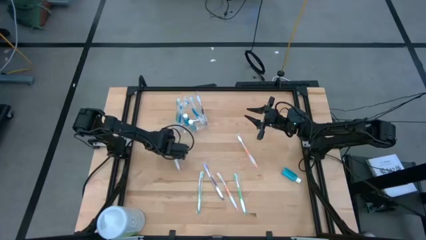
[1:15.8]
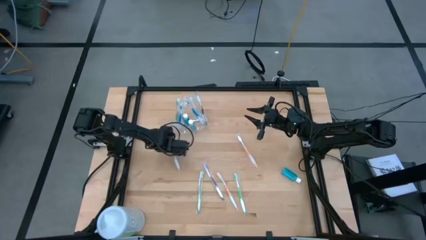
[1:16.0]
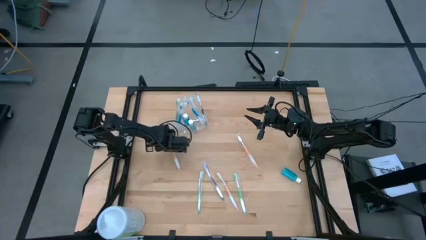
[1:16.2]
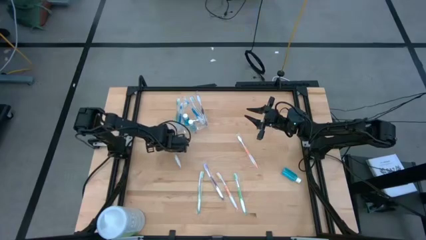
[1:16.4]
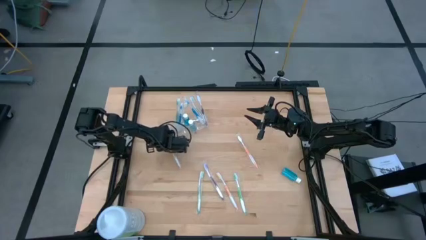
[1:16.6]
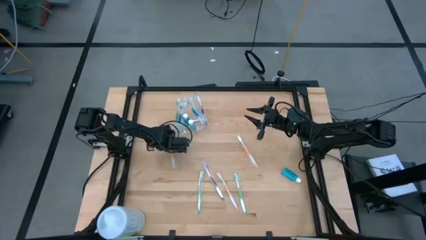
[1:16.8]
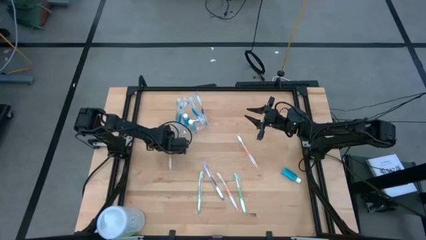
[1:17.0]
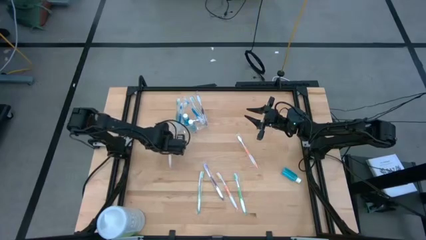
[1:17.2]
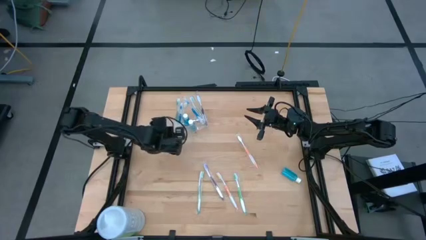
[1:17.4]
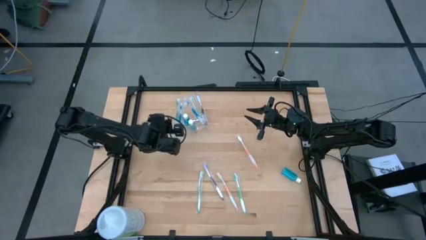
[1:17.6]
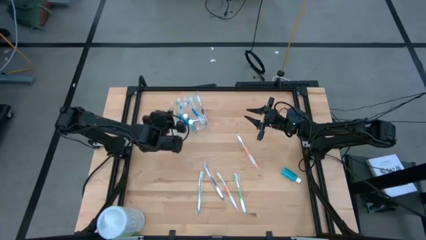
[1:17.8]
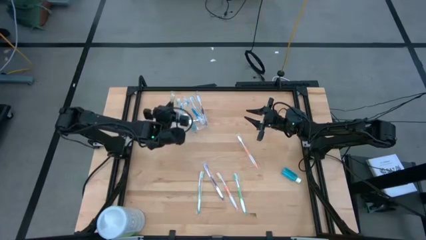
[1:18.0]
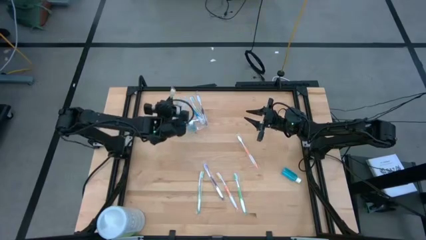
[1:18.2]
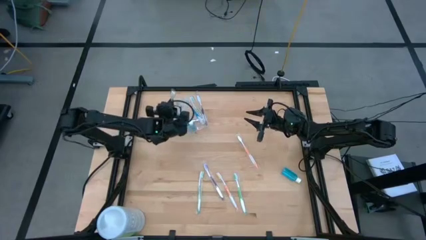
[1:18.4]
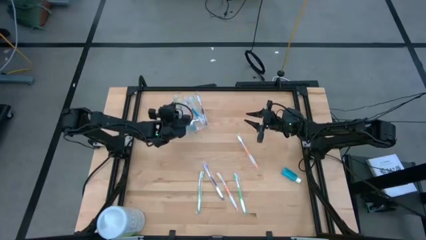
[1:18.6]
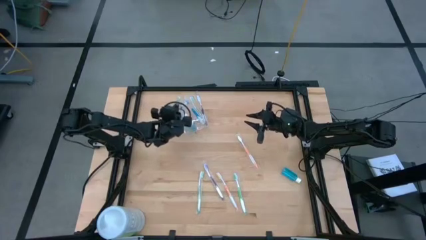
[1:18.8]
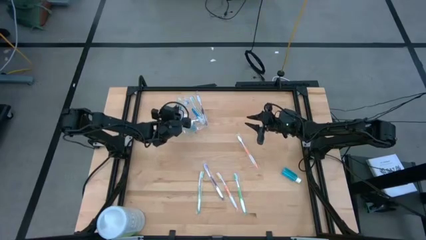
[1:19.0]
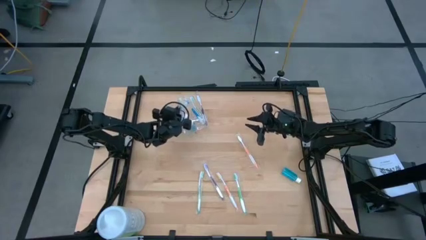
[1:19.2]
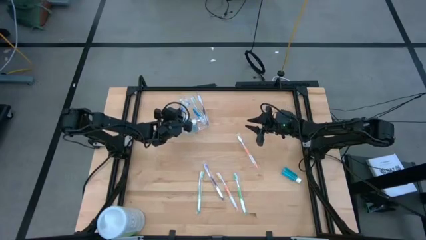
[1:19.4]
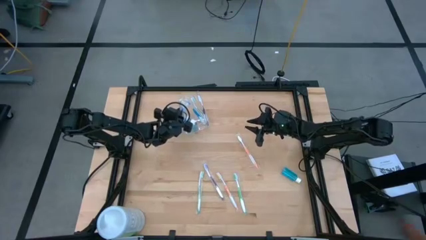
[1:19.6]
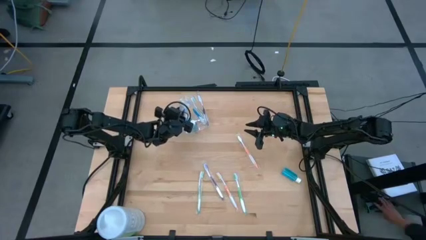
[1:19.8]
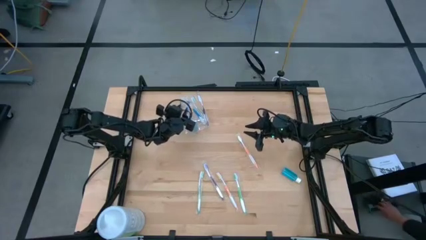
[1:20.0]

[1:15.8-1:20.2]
Task: Pick & Place toothbrushing station
Put the orange toothbrush into the transparent organizer

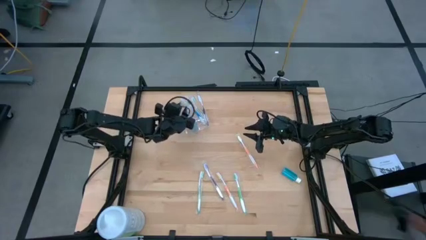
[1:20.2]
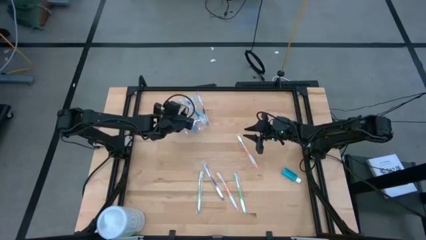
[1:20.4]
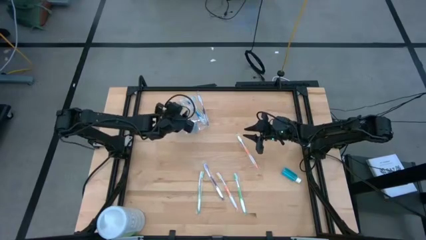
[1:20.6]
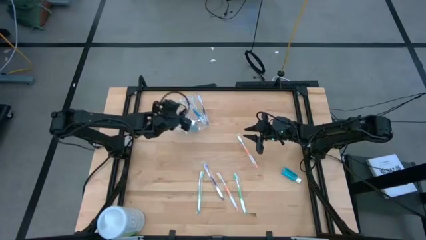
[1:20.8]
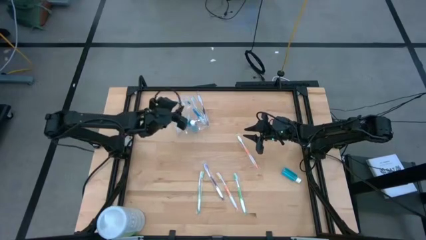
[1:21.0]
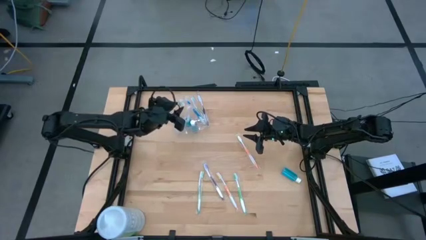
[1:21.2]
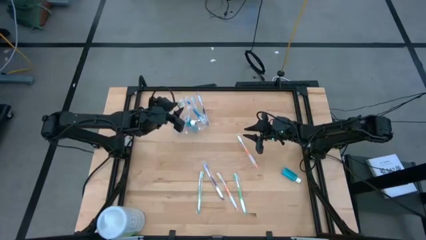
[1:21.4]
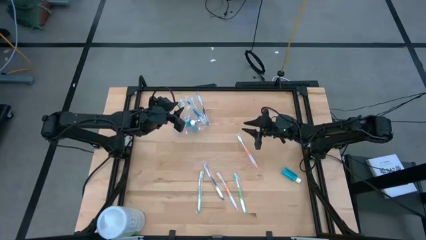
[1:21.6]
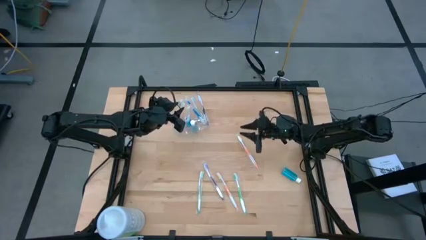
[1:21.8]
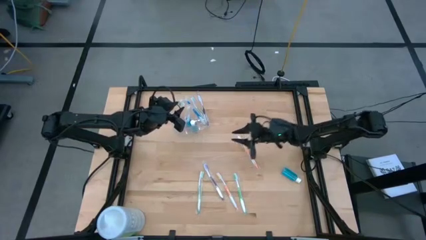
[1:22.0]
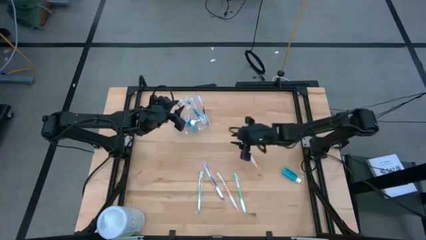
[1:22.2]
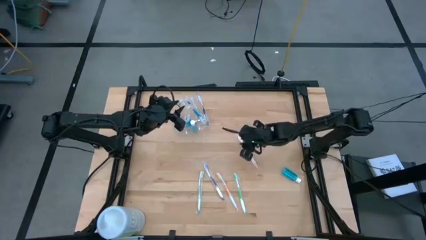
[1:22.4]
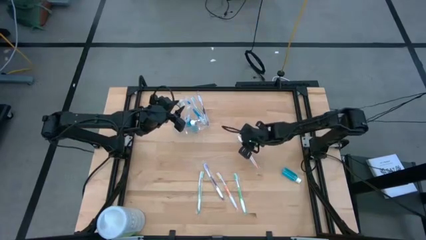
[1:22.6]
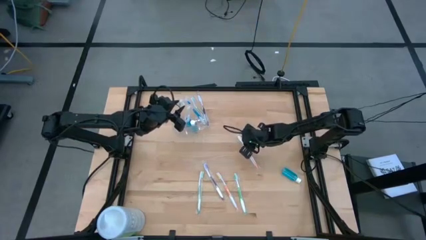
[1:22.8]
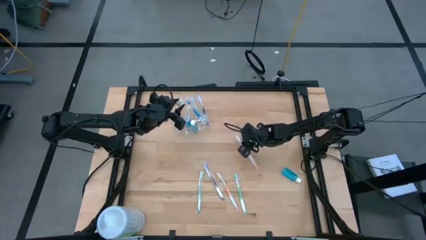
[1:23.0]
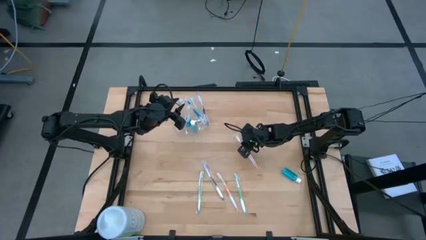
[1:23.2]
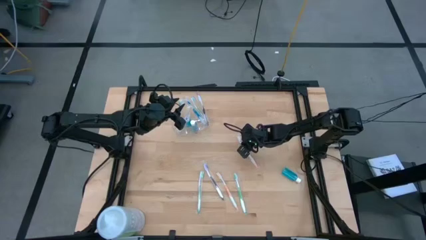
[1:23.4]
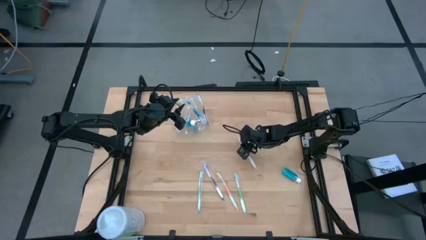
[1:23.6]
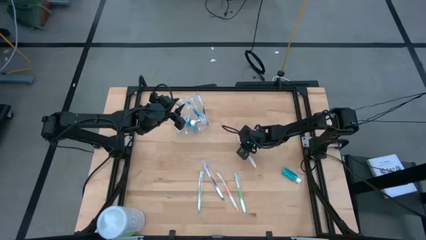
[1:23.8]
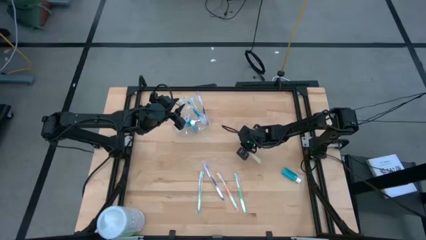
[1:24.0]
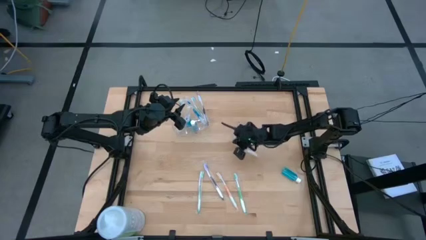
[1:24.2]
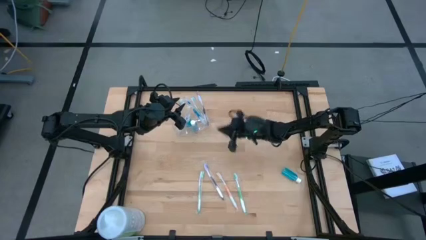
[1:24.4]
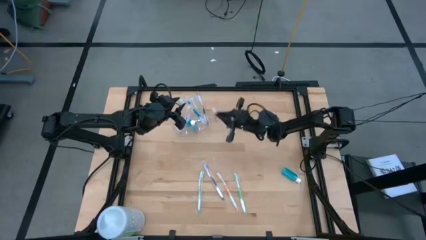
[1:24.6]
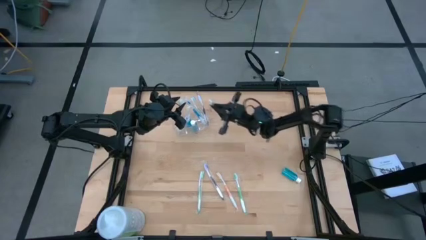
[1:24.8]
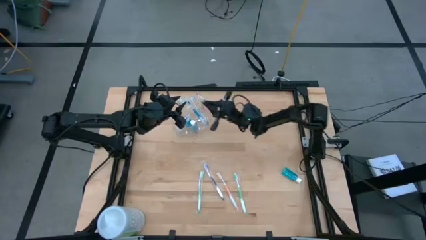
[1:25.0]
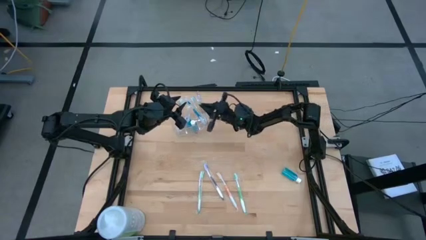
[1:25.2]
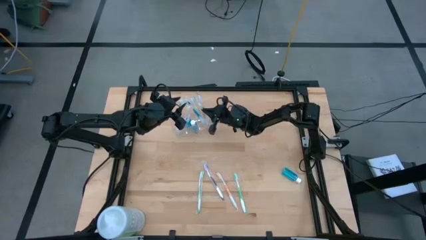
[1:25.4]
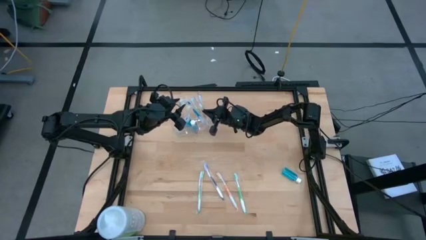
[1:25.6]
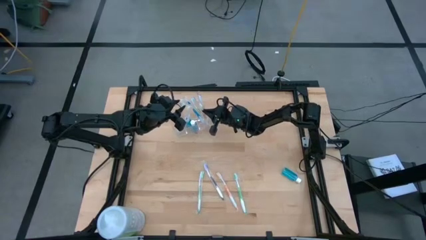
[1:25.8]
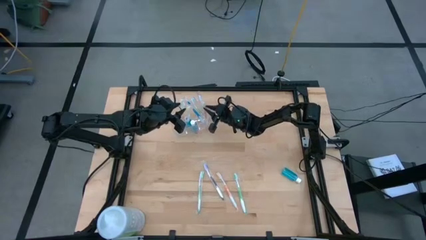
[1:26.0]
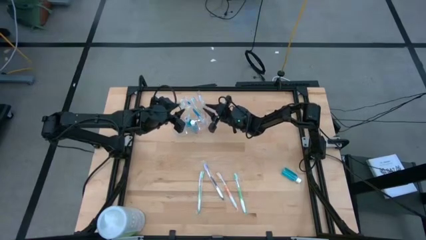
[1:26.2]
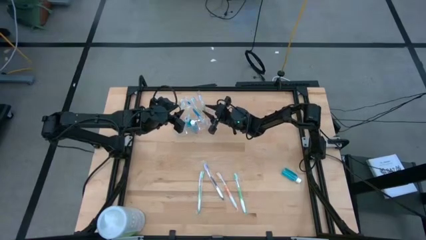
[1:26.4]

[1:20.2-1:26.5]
Put the orange toothbrush into the transparent organizer

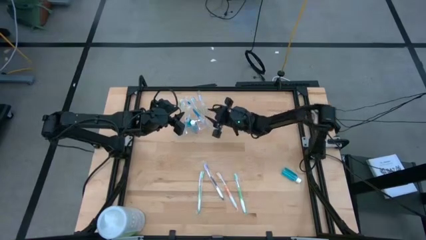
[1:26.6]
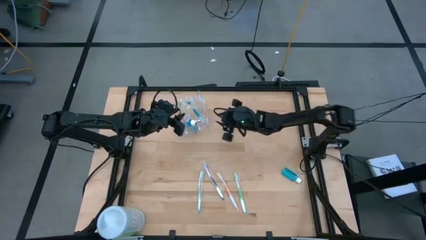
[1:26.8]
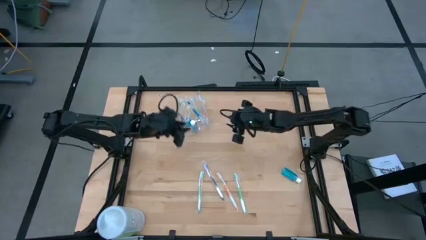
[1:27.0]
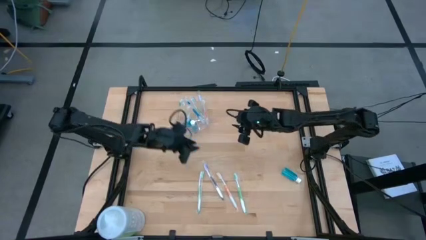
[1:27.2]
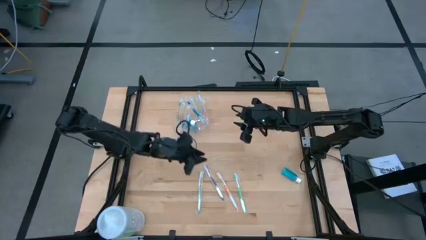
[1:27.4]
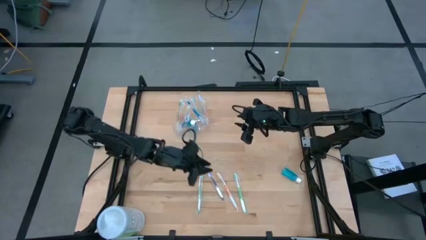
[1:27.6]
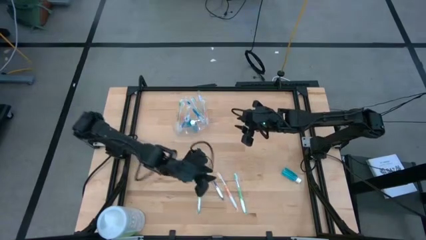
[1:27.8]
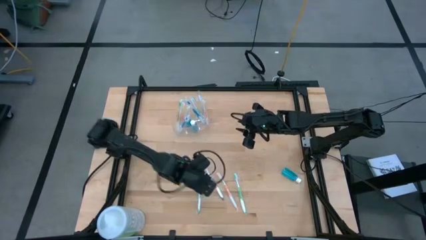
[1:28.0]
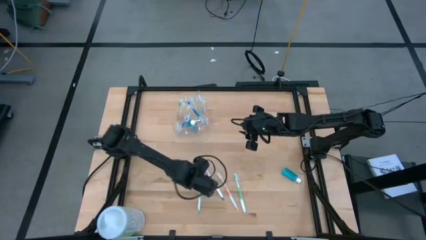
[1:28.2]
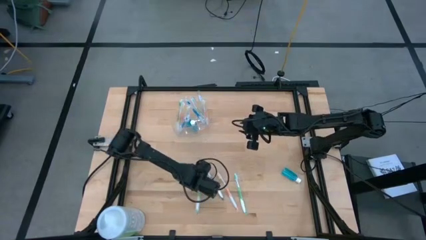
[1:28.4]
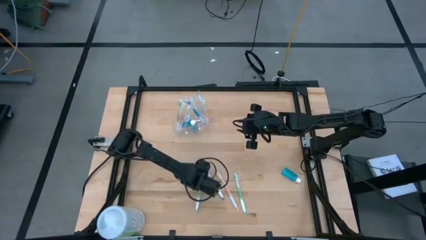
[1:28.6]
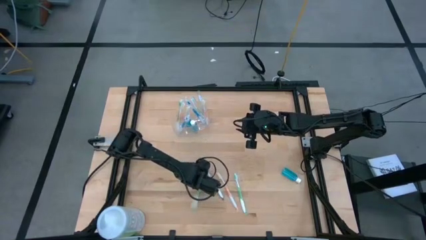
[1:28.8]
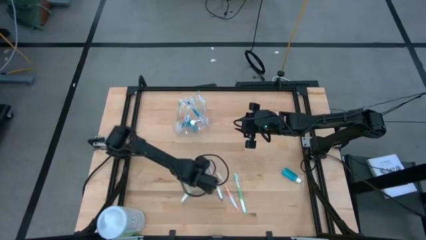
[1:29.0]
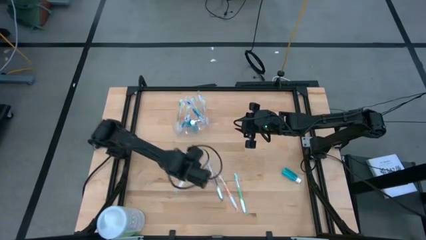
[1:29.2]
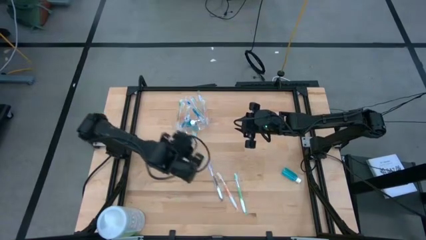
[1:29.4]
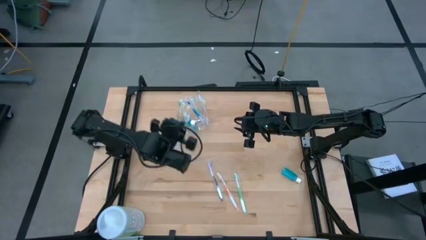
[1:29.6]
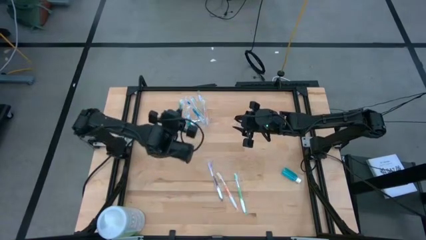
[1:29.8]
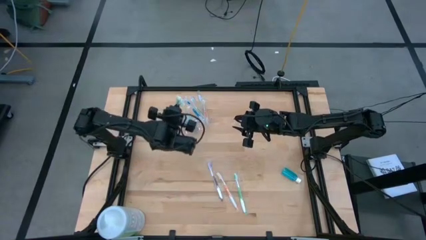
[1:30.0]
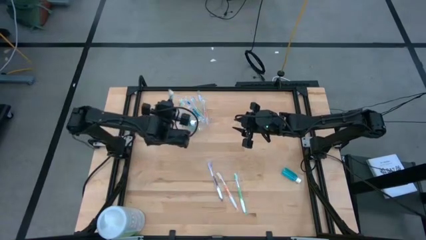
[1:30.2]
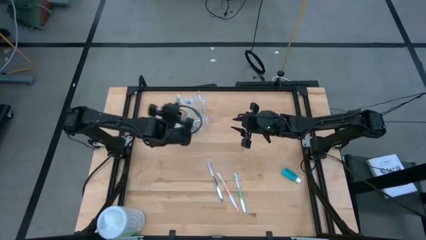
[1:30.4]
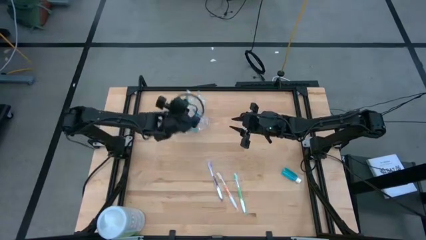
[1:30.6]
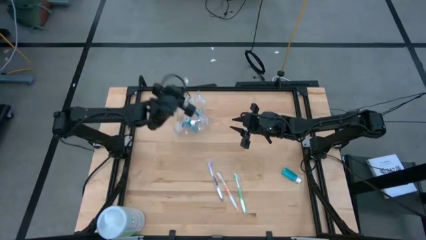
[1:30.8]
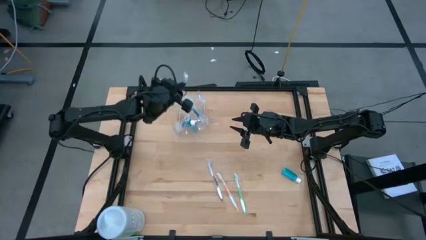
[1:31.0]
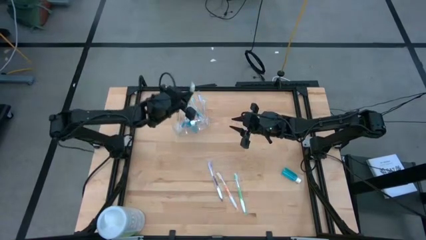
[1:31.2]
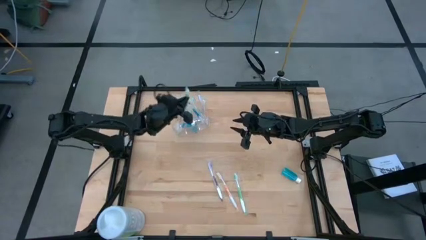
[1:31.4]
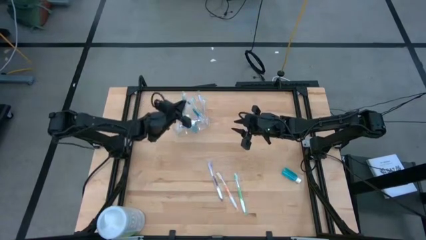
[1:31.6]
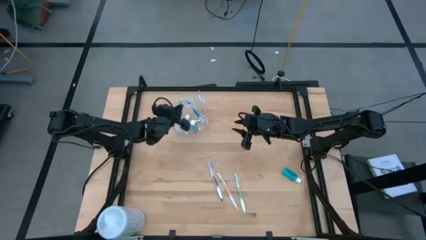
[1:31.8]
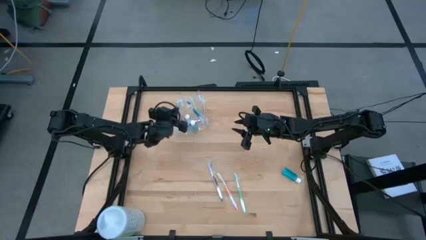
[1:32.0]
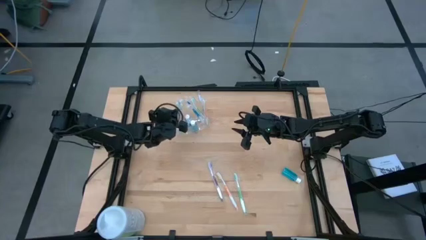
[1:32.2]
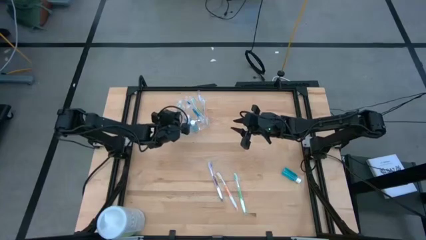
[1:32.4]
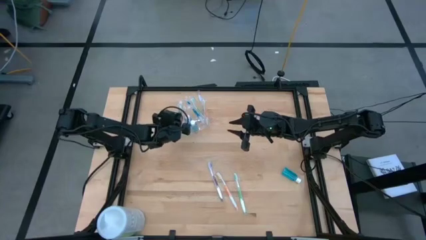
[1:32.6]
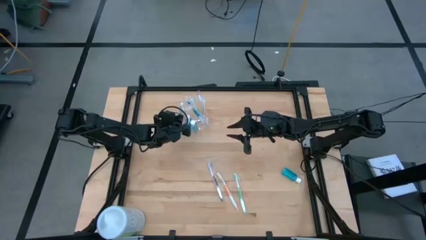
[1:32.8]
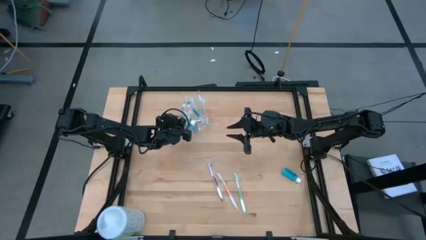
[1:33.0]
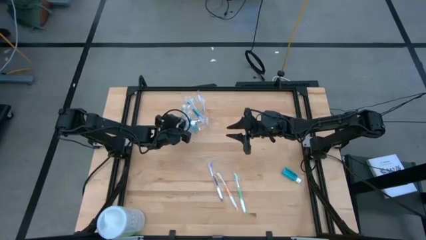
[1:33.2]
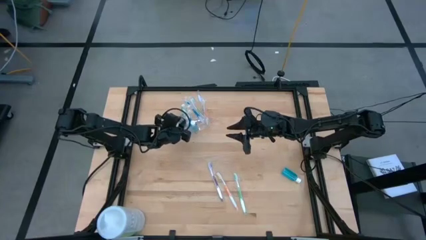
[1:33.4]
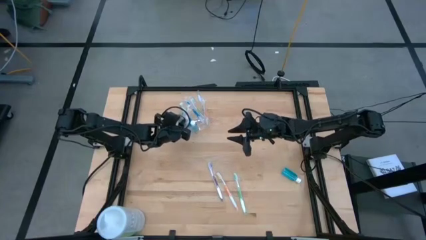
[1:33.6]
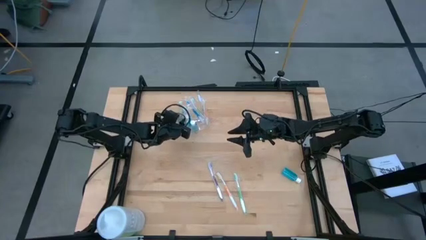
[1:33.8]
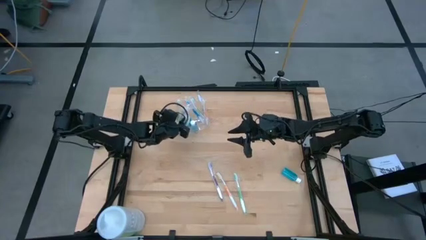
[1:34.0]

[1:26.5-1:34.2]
Put the green toothbrush into the transparent organizer
